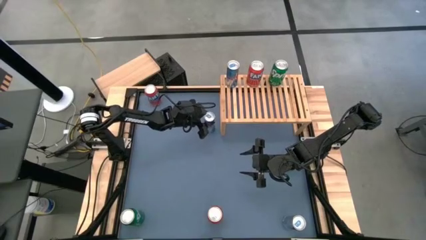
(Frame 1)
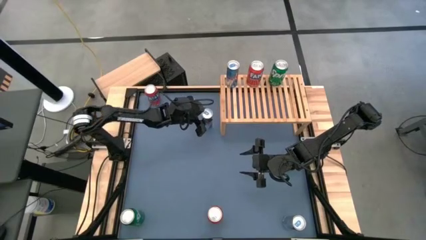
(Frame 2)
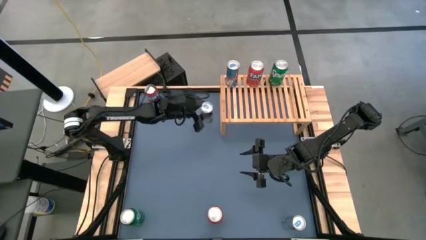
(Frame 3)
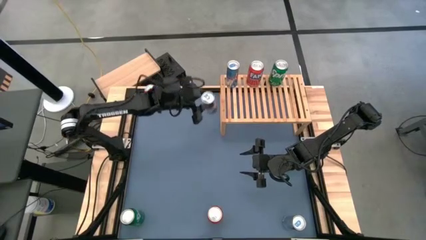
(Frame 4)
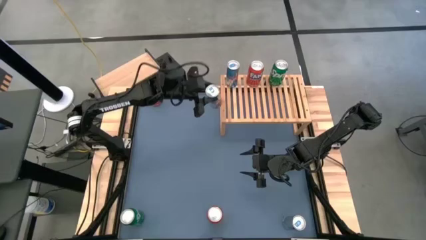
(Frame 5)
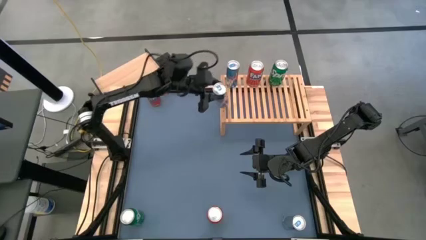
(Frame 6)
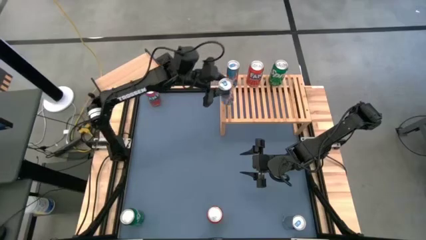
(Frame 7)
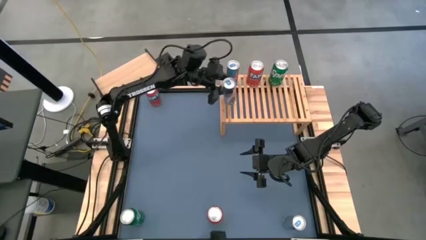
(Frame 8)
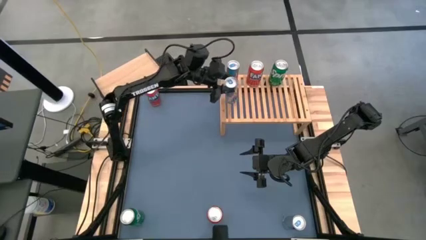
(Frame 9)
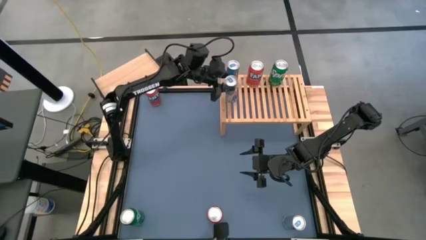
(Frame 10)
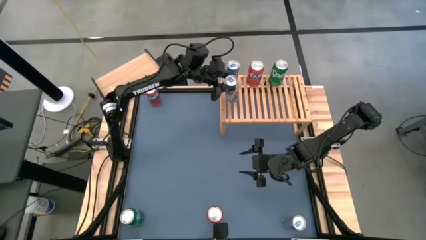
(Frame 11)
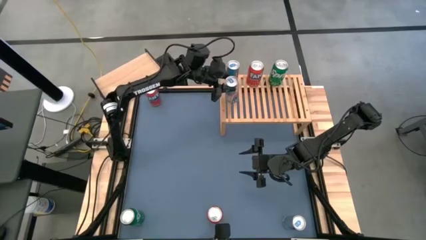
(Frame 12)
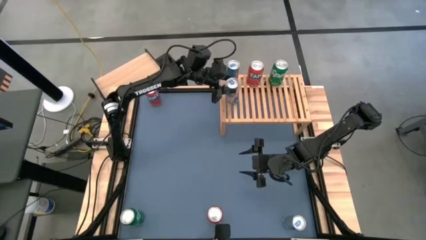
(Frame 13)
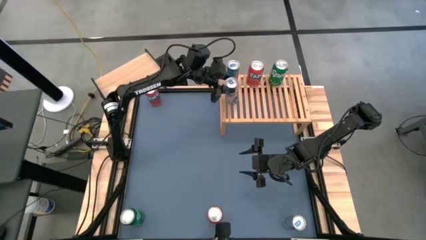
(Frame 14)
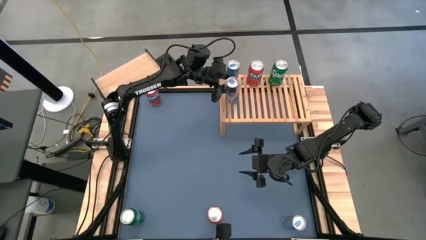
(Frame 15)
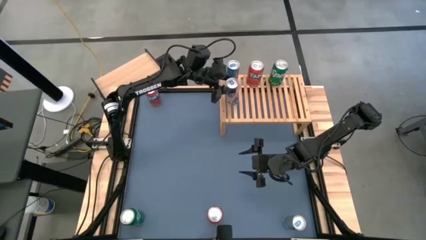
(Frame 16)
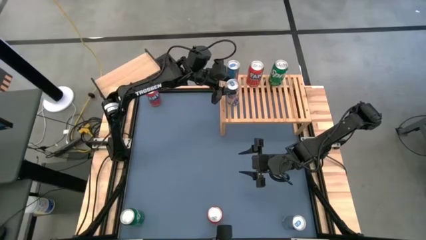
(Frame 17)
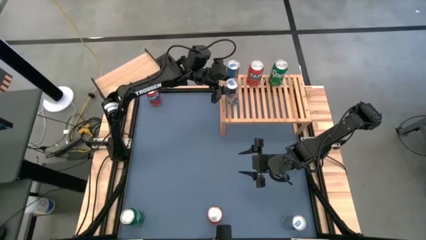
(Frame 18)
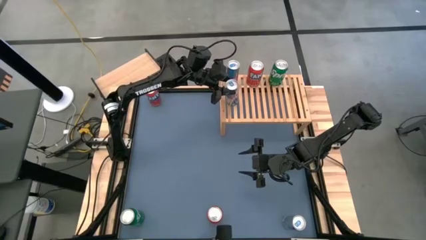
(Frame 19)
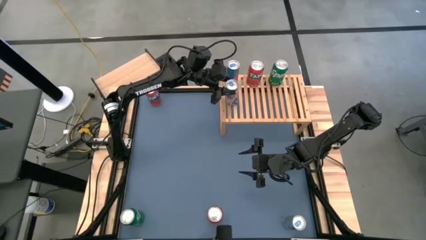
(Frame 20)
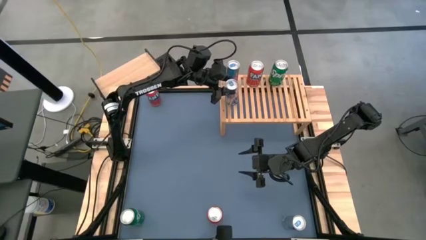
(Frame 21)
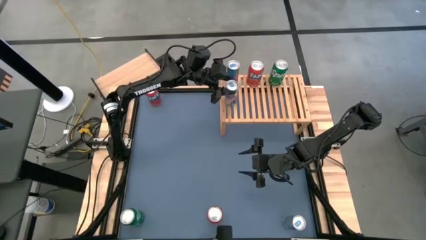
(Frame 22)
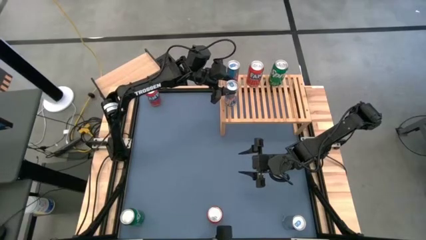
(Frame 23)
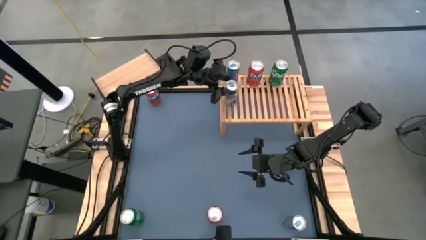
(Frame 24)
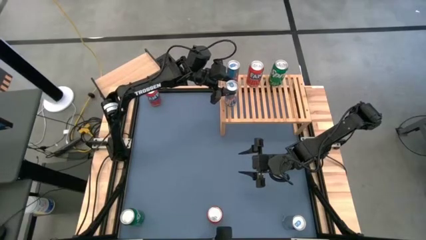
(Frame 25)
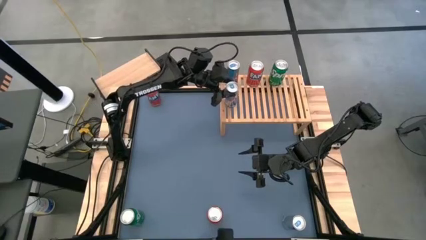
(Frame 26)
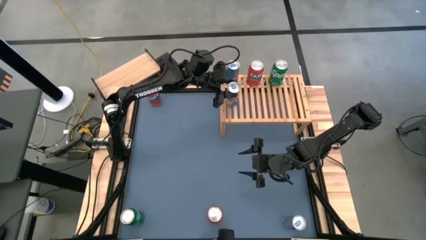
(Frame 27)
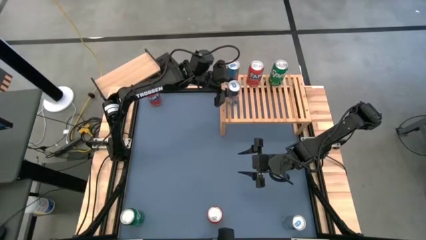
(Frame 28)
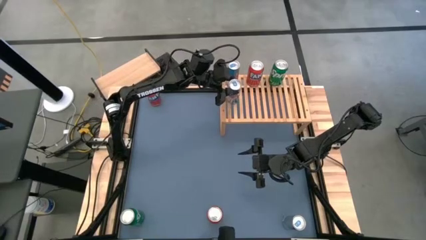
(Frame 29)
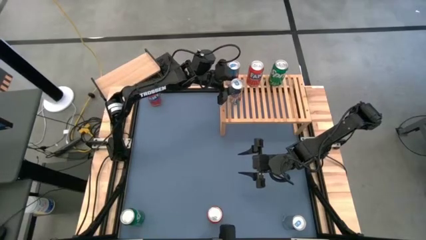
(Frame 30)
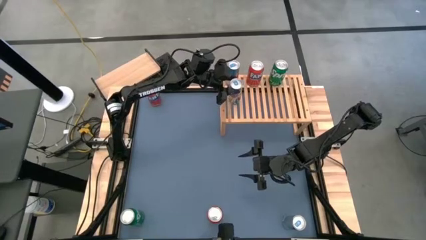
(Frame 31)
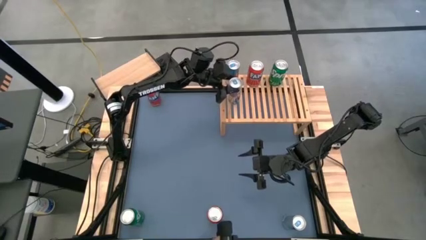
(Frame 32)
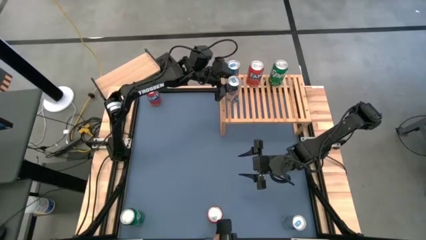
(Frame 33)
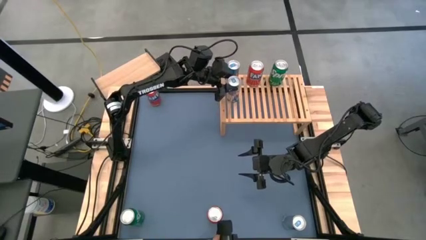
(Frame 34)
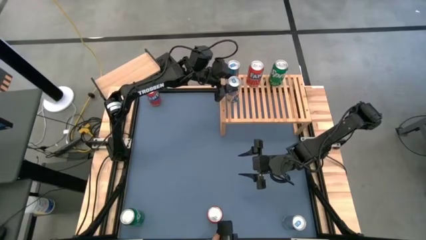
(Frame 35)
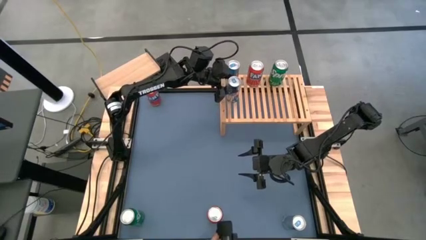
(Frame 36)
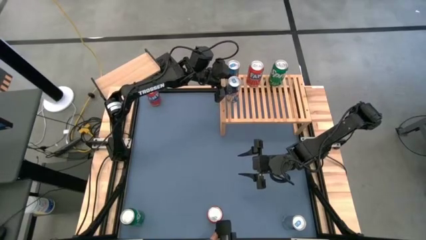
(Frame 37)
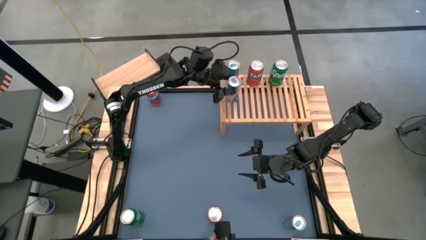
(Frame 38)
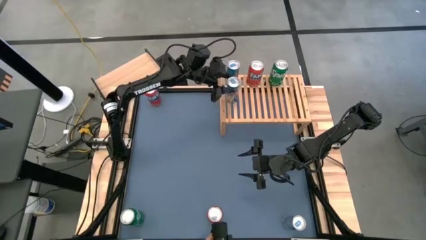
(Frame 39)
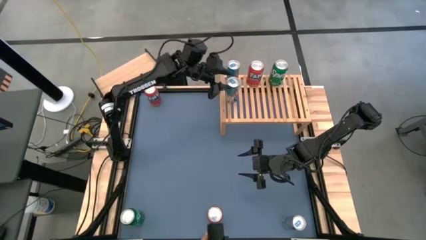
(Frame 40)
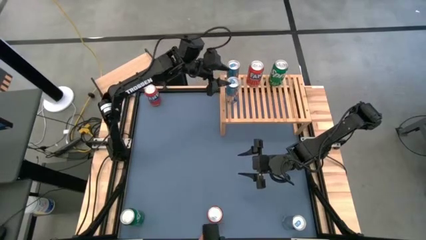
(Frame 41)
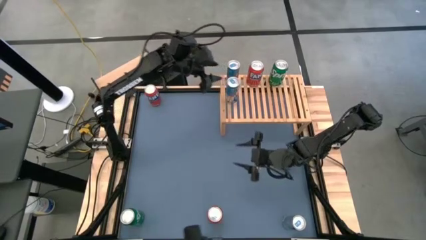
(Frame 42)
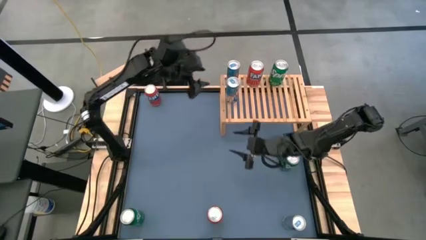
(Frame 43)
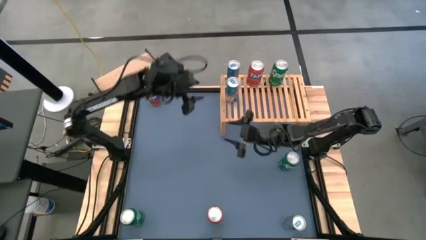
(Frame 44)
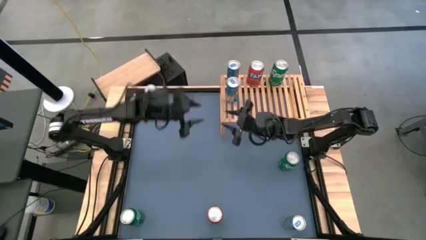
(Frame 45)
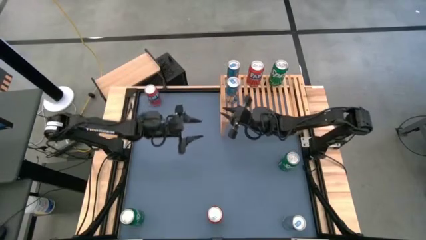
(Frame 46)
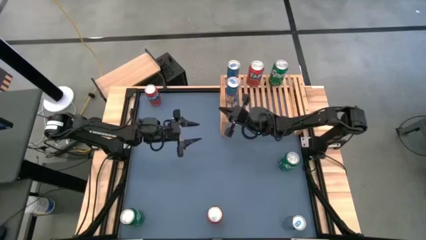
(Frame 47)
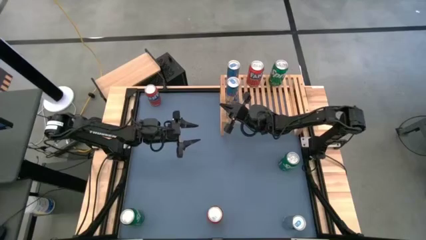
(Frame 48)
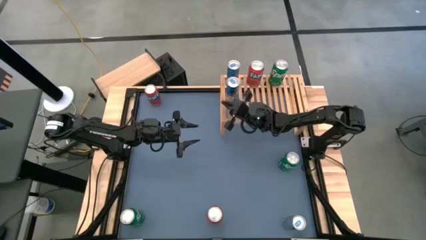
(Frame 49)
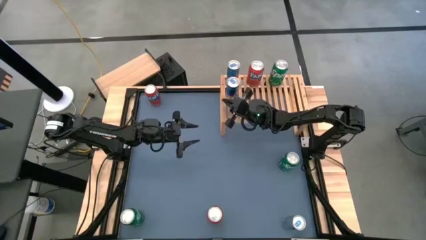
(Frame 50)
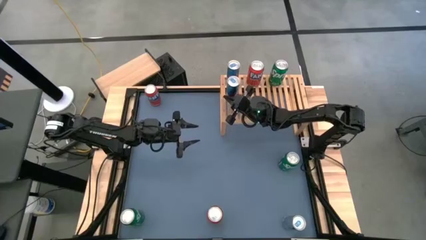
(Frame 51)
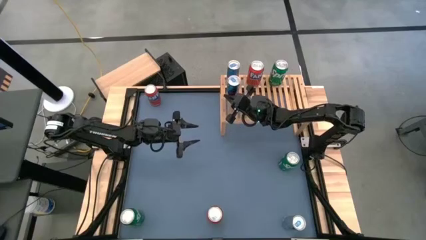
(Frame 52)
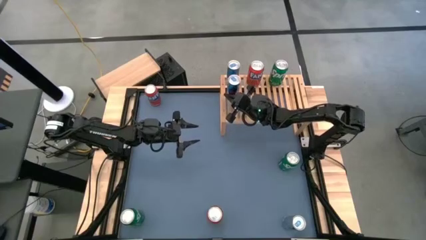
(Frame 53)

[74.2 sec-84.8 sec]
Task: Place canned beverage on shelf
Put the top blue soda can on the shelf aligned with the other blue soda can

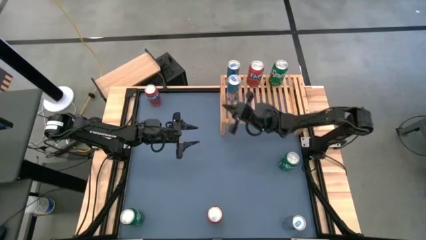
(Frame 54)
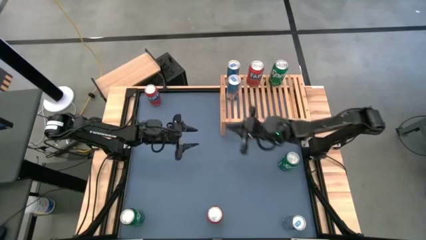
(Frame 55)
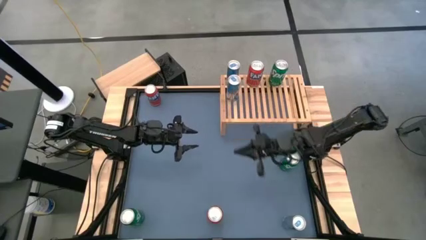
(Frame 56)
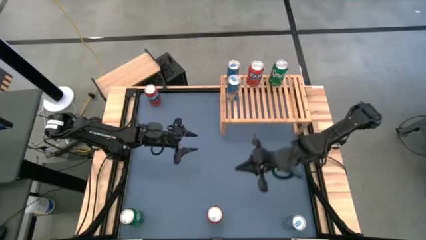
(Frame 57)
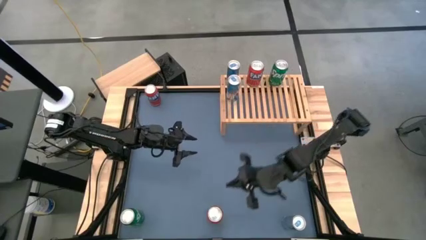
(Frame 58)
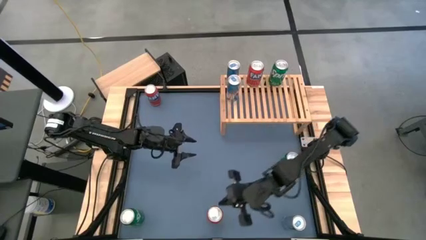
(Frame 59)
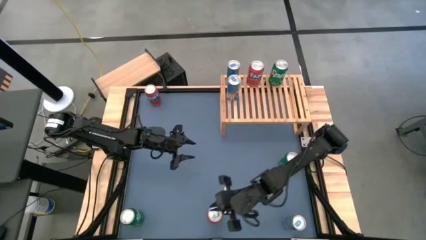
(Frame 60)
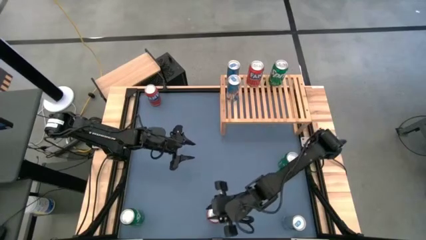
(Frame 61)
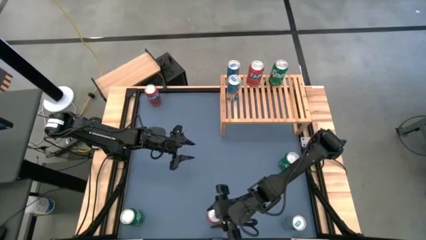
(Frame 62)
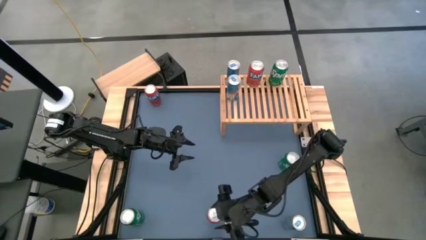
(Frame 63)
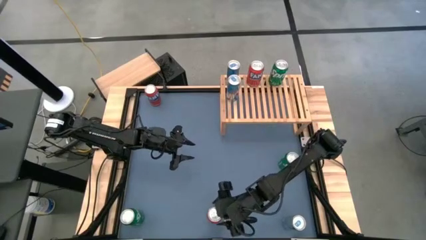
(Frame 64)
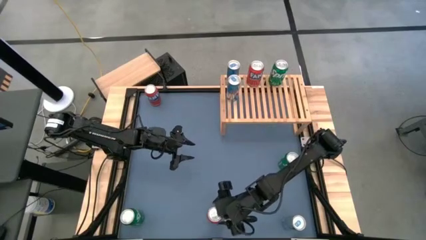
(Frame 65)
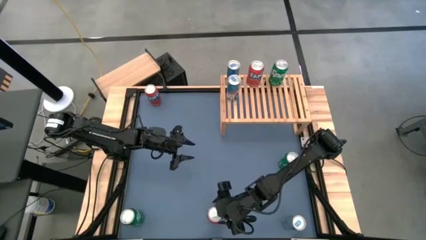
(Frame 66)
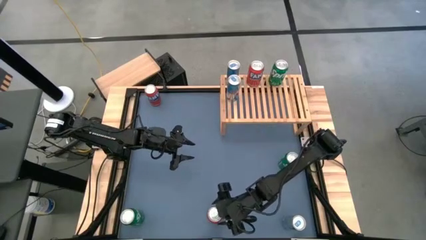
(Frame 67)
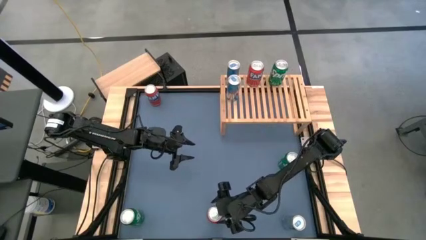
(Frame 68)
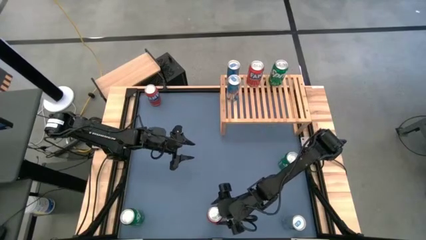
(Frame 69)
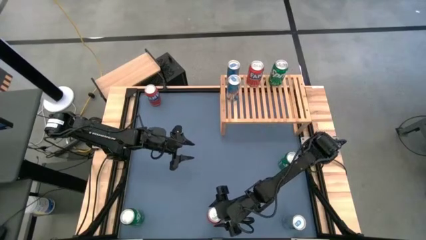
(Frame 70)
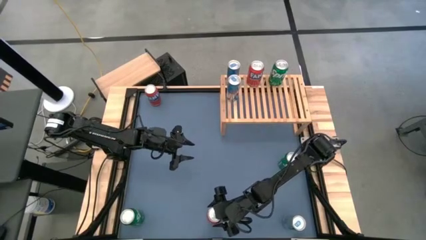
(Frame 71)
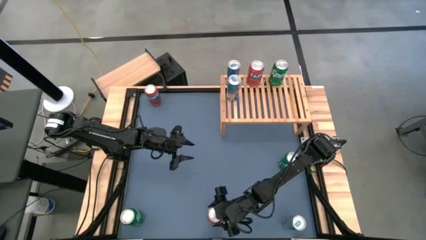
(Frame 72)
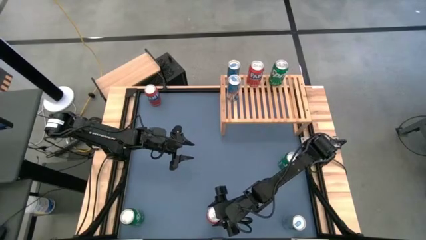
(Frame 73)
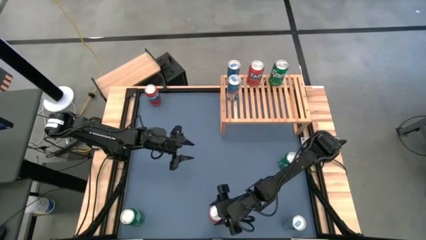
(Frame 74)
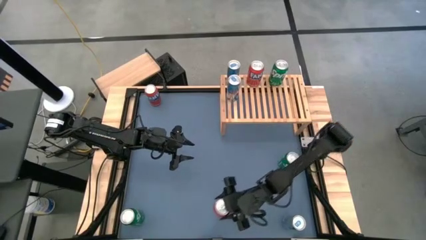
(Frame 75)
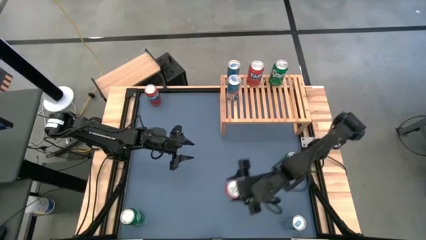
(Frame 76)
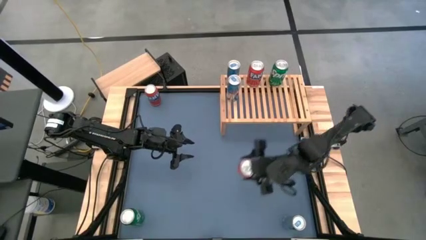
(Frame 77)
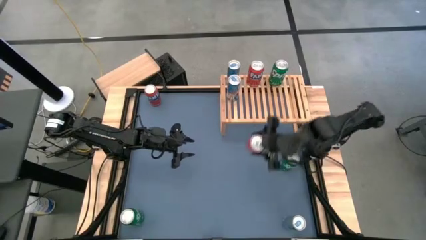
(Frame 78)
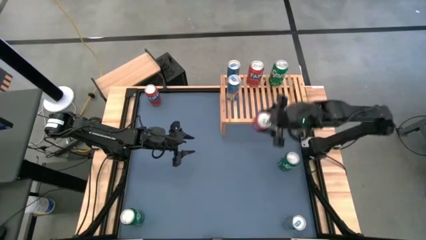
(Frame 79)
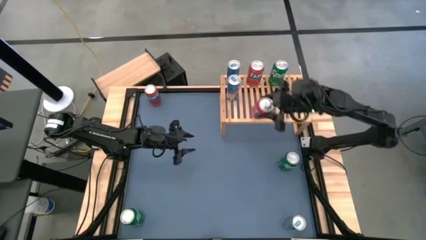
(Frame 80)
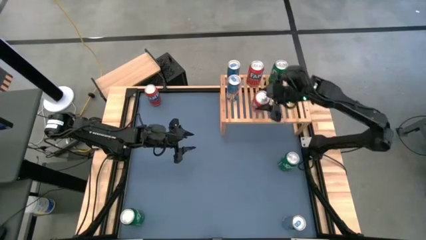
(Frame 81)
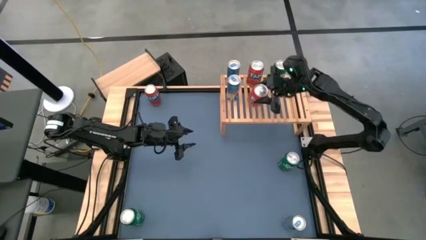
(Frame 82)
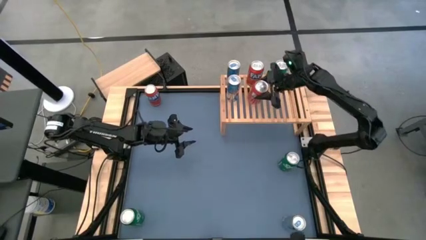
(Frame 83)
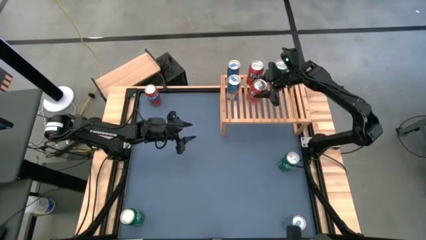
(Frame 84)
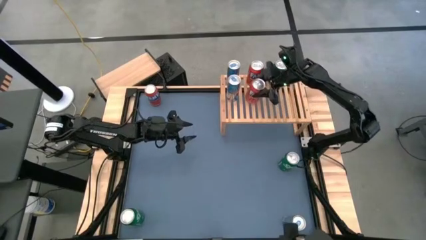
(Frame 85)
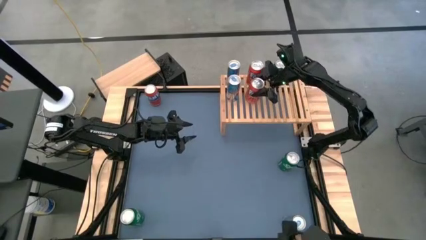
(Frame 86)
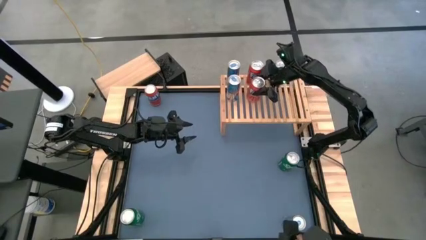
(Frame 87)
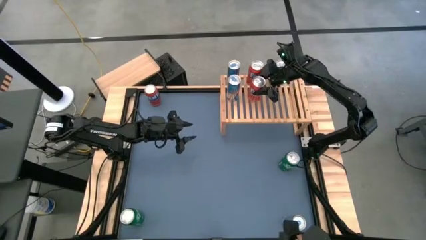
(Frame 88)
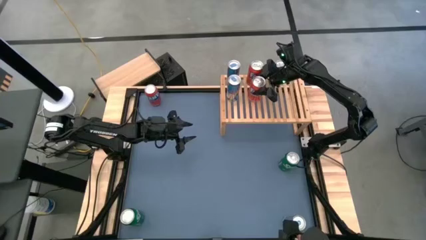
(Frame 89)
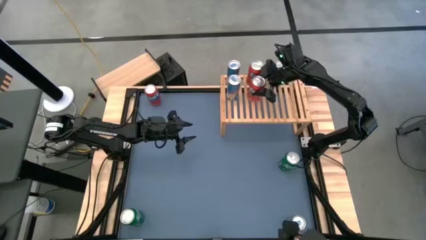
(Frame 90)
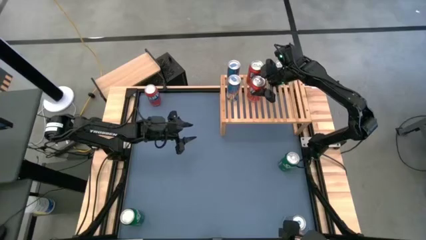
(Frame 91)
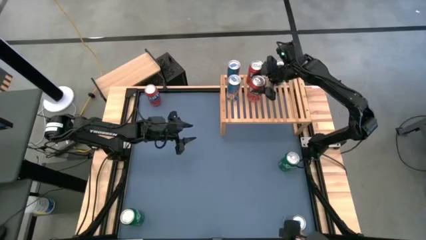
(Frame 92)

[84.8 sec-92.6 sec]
Put the bottom red soda can on the shelf aligned with the other red soda can
